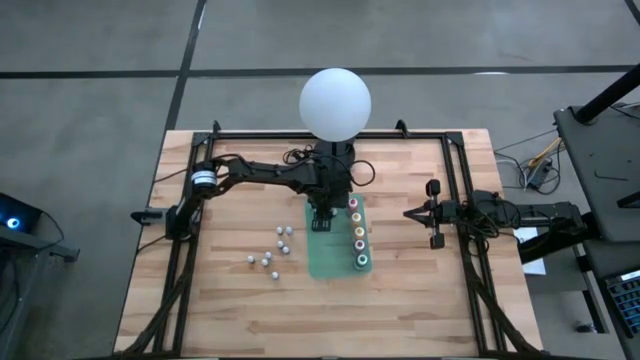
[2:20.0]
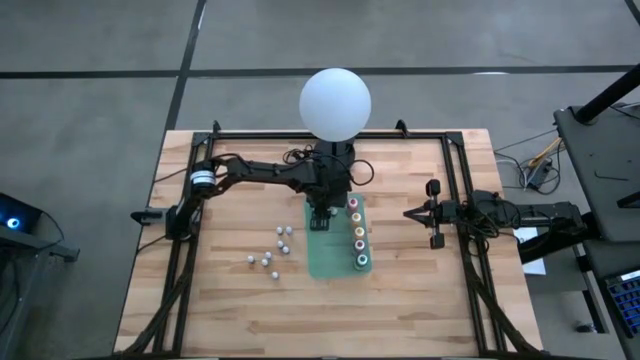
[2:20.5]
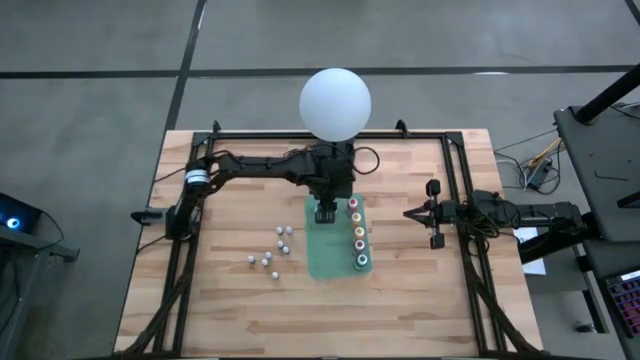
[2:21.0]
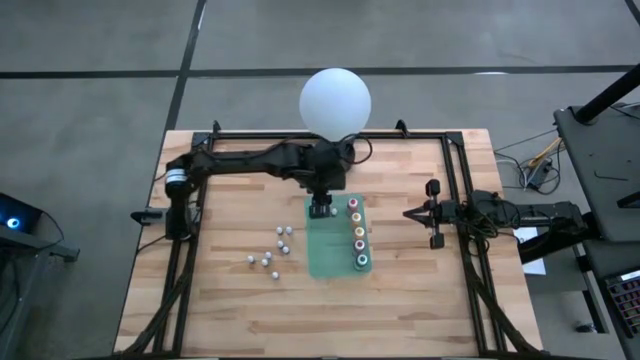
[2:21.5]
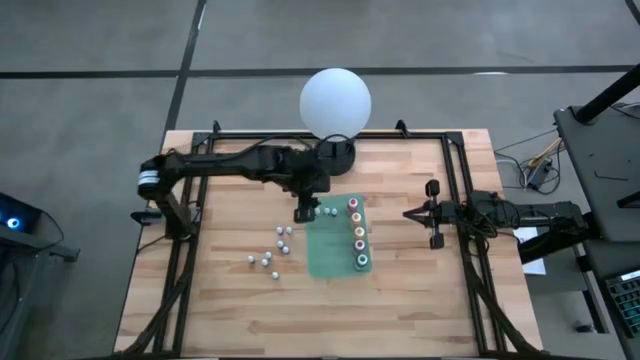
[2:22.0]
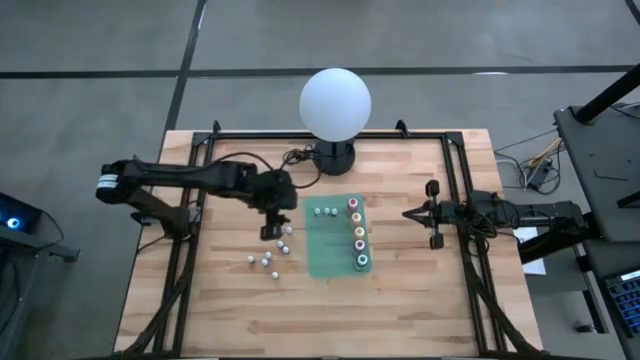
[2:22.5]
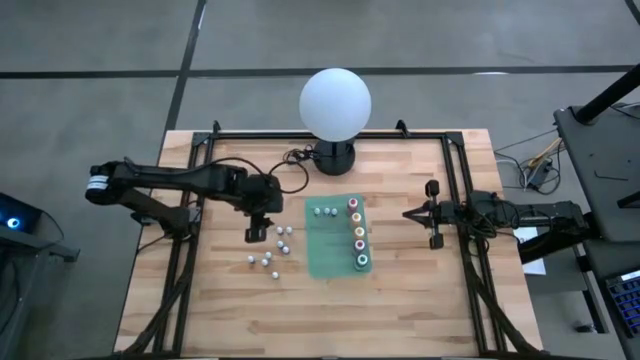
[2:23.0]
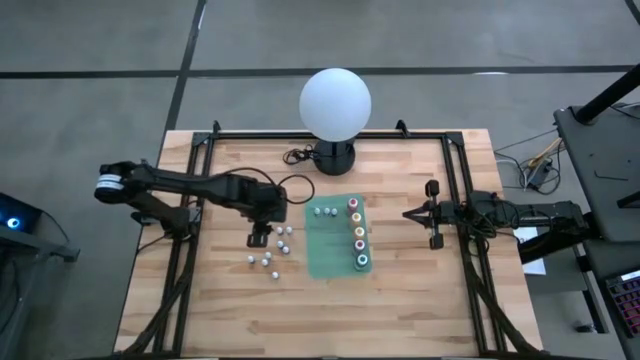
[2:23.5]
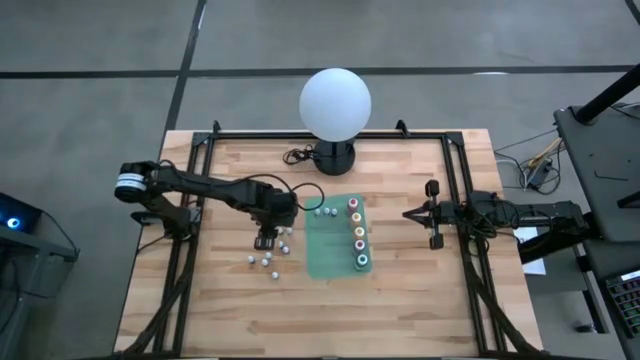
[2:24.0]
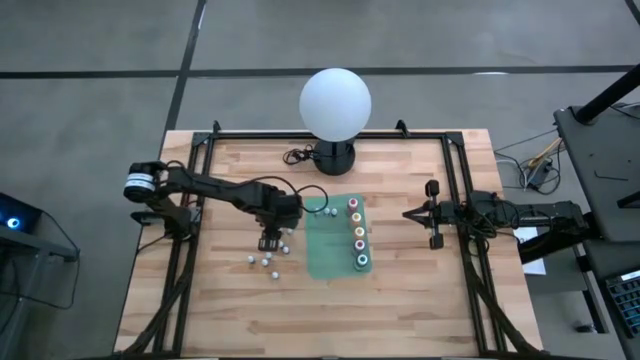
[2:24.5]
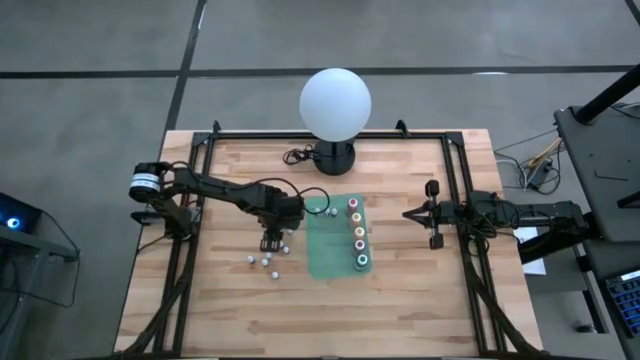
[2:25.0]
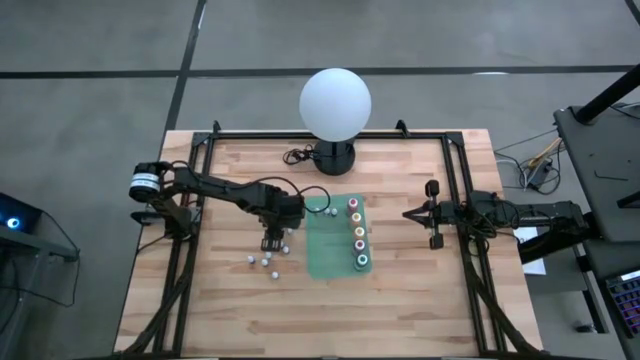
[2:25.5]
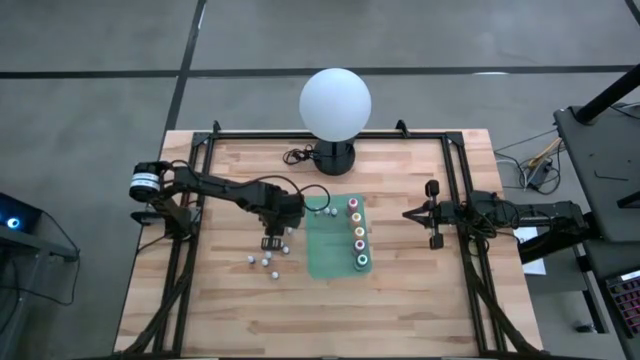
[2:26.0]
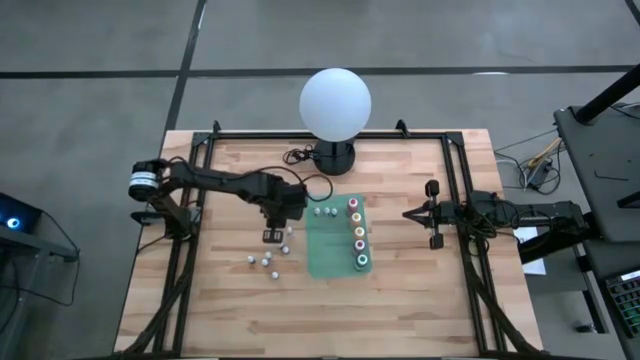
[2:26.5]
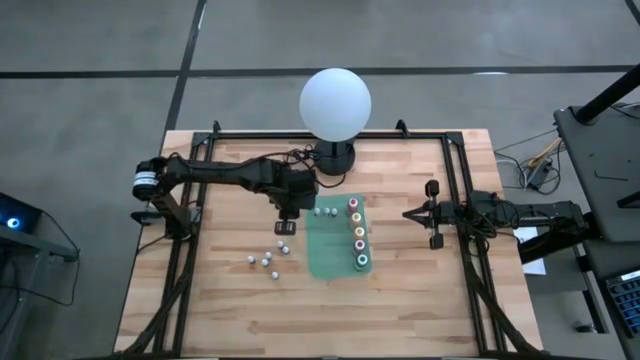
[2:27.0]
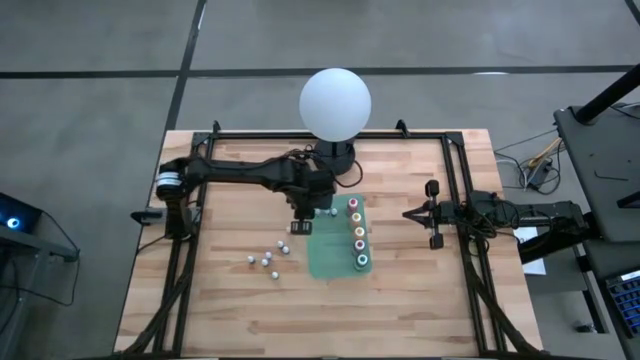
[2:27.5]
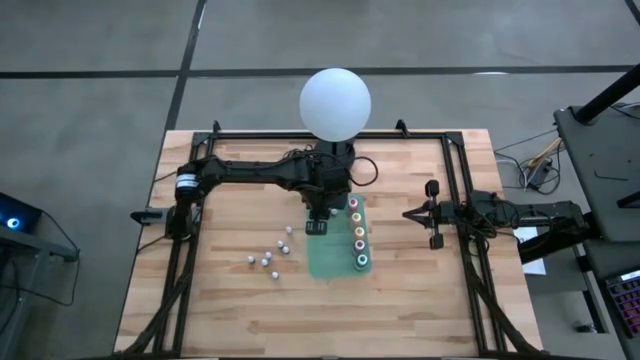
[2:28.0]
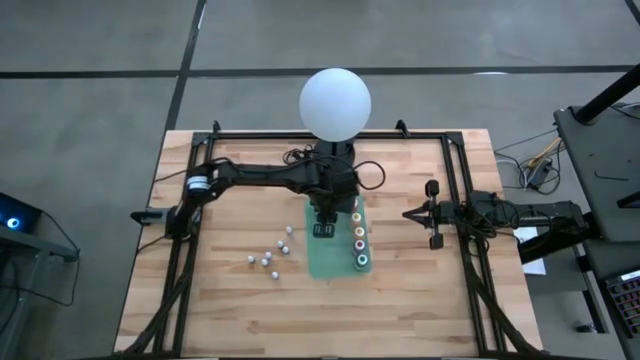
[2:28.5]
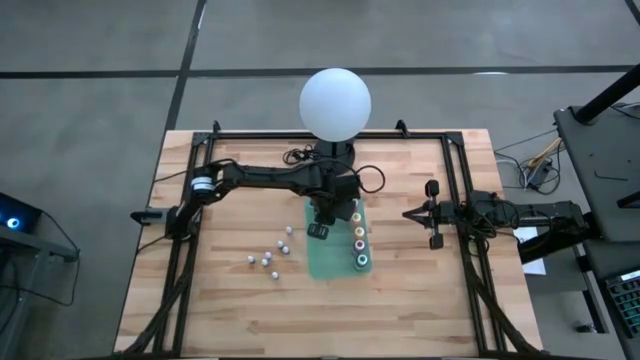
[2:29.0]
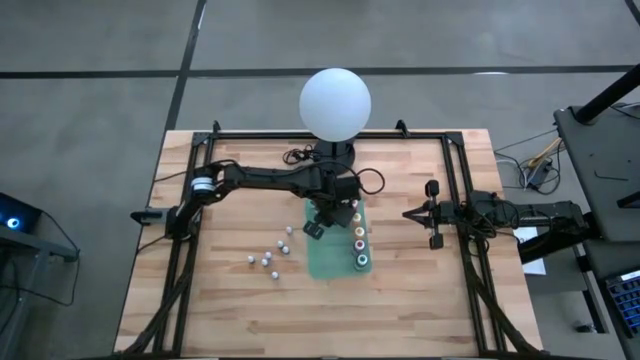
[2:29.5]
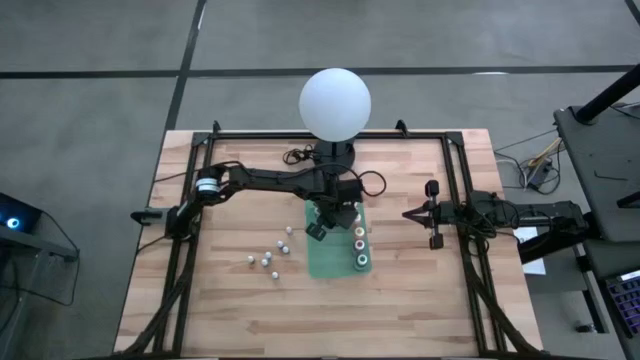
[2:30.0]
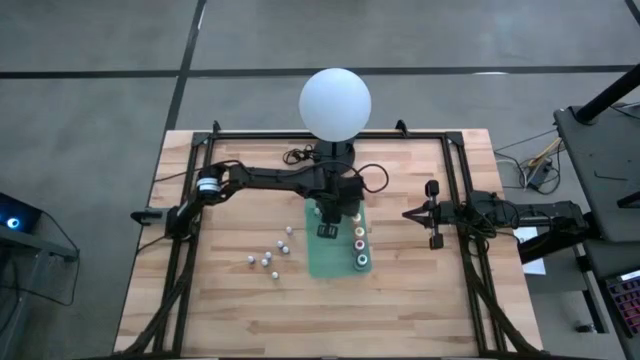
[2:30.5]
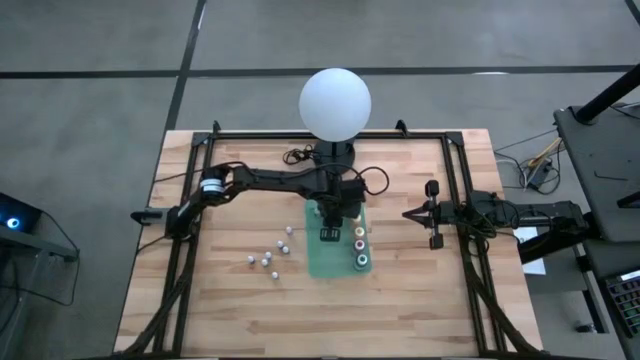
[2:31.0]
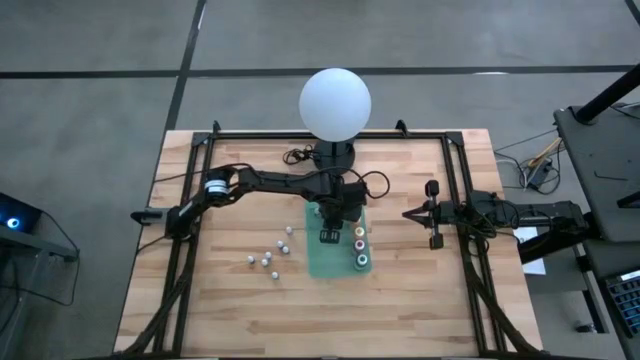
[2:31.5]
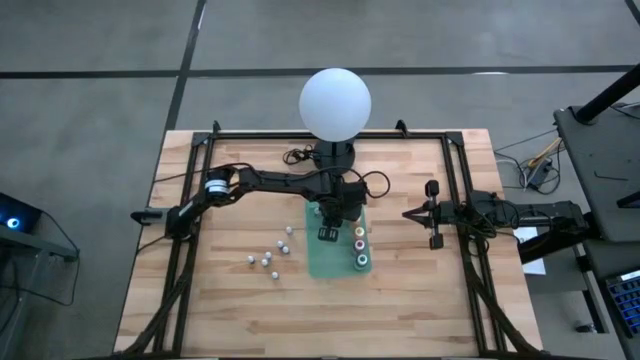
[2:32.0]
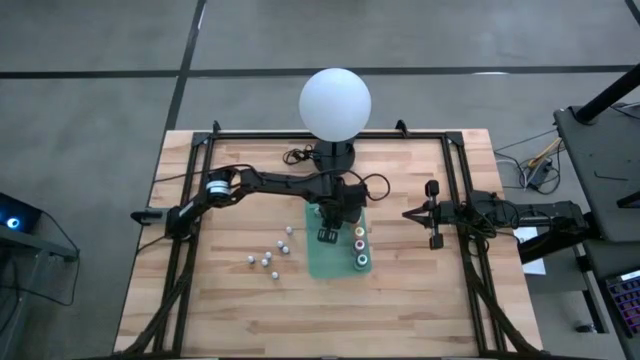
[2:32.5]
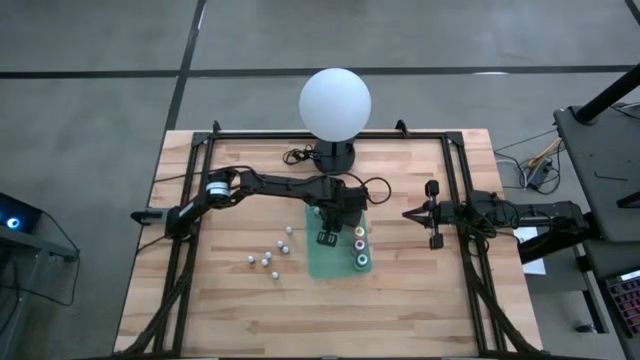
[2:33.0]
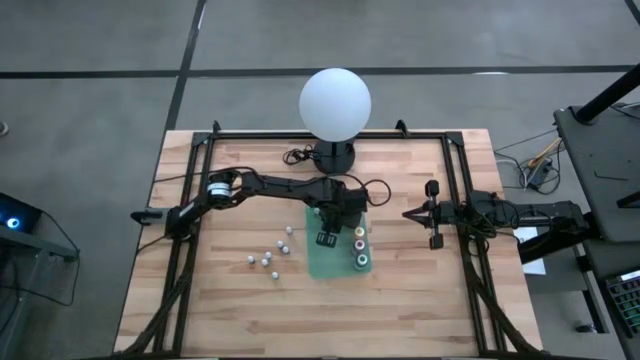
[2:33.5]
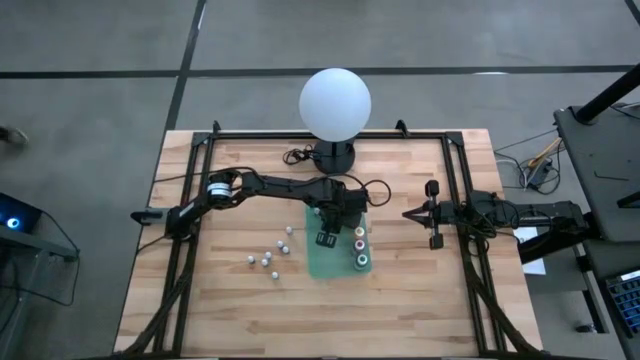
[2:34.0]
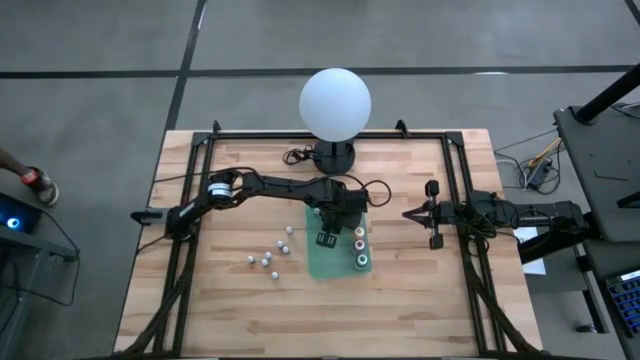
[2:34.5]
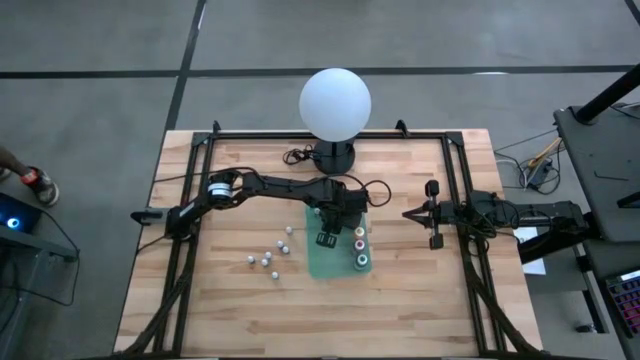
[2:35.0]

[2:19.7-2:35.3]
Task: Pick & Place food coloring
Put the small black food coloring bottle into the green bin

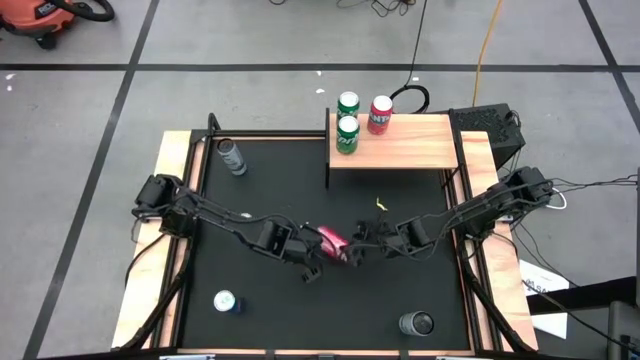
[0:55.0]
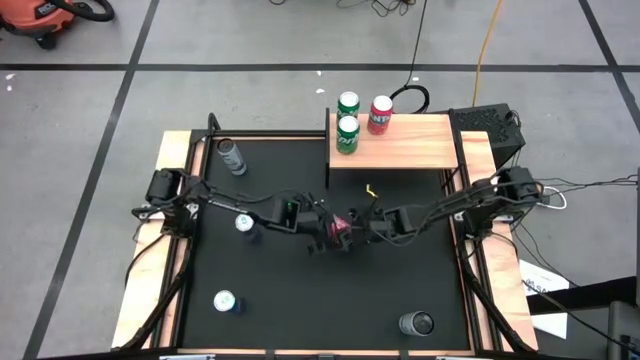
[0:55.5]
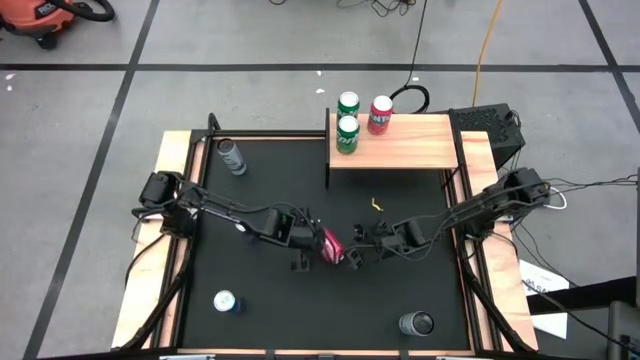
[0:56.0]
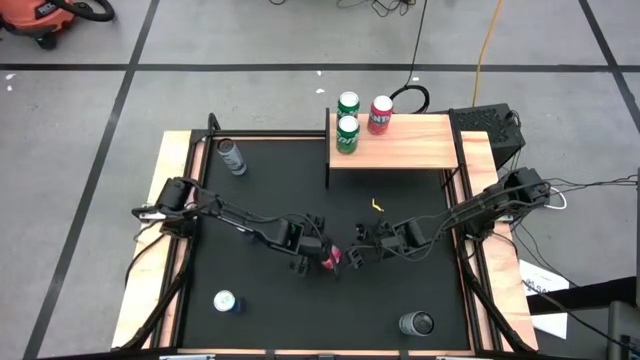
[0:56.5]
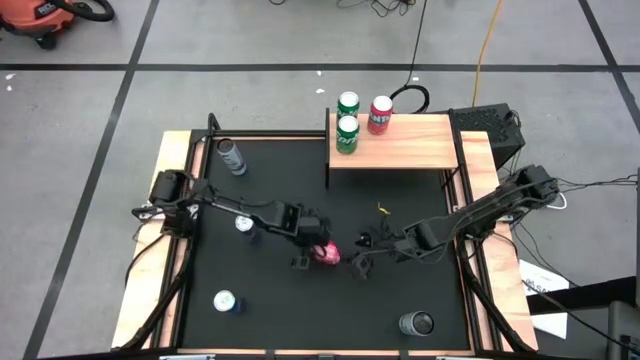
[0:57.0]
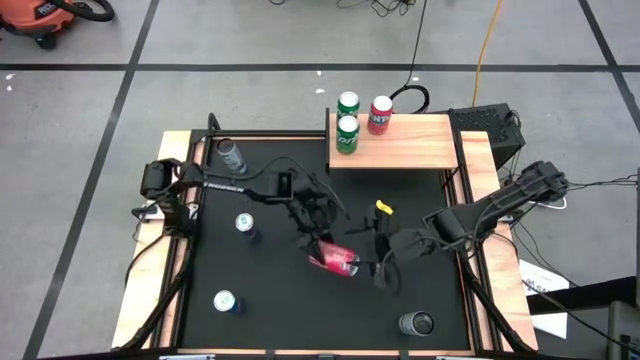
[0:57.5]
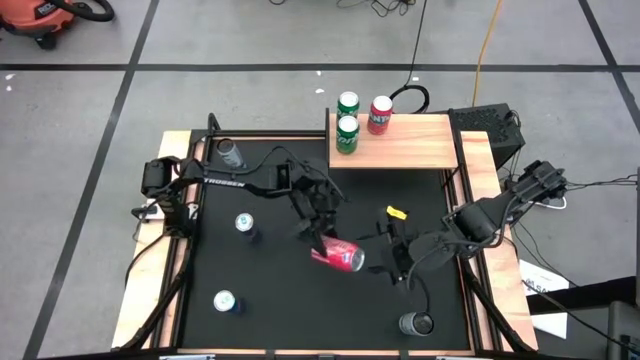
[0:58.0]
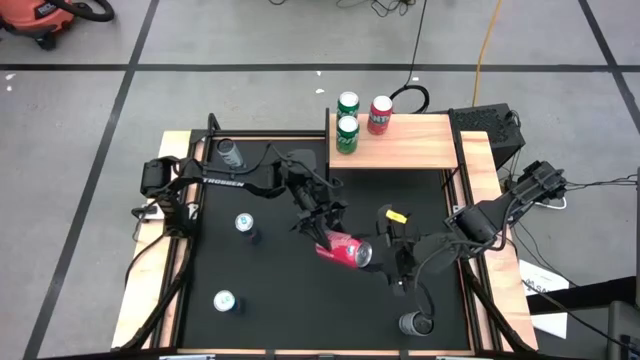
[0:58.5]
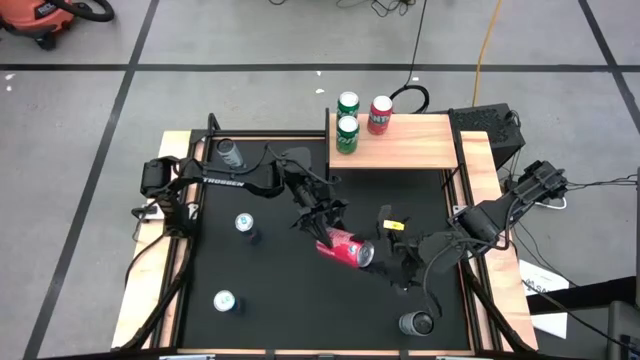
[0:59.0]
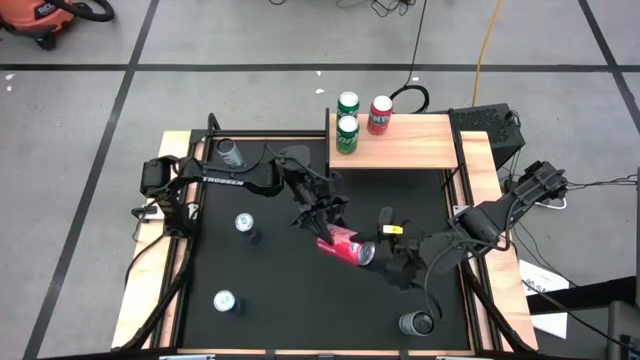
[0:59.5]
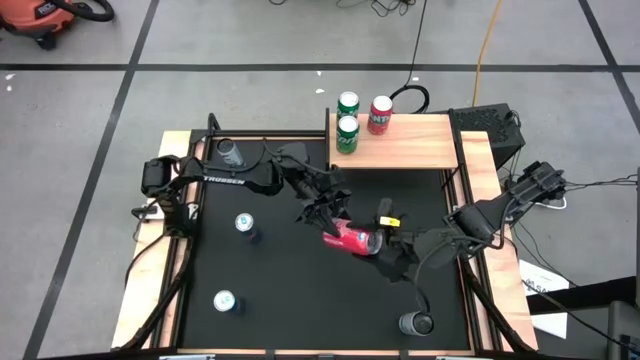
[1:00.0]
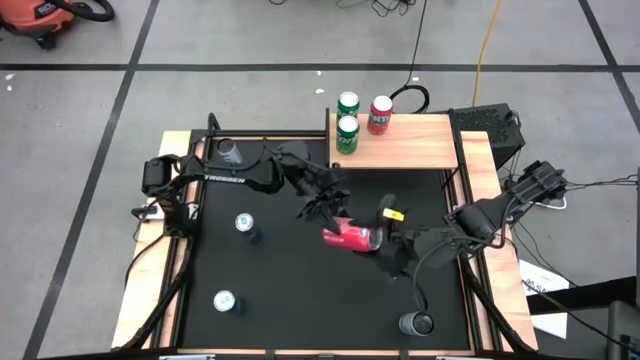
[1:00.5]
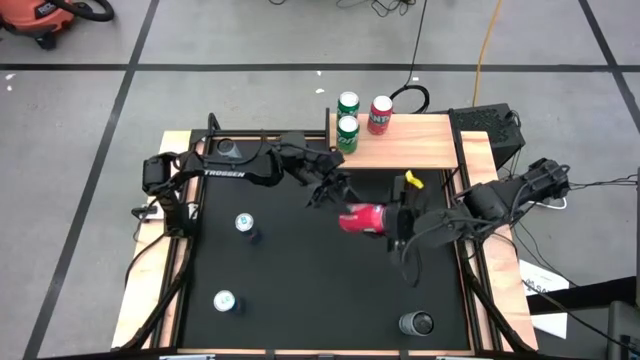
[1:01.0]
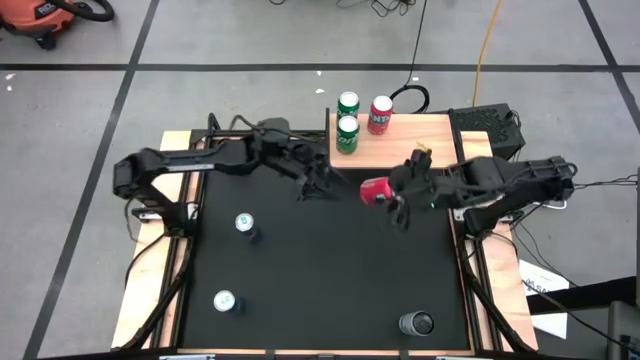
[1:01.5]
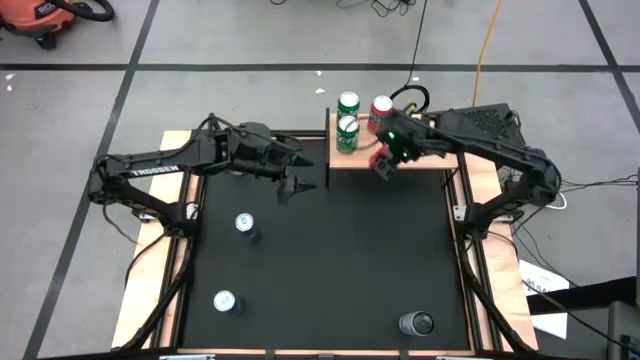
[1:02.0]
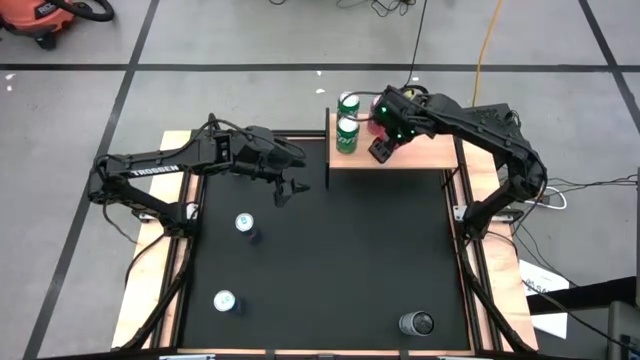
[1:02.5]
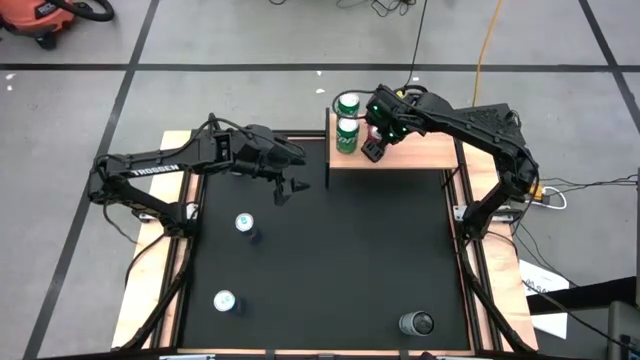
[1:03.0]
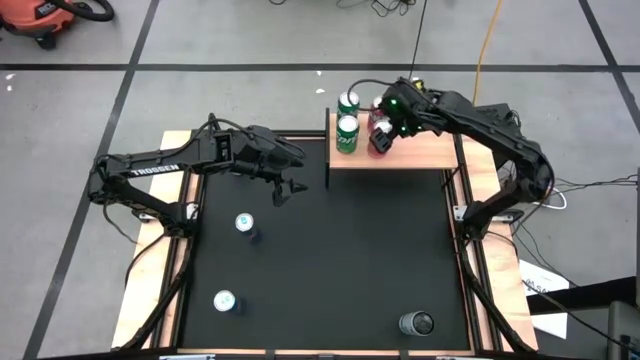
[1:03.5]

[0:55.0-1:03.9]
Task: Place canned beverage on shelf
Put the orange soda can on the shelf aligned with the other orange soda can
